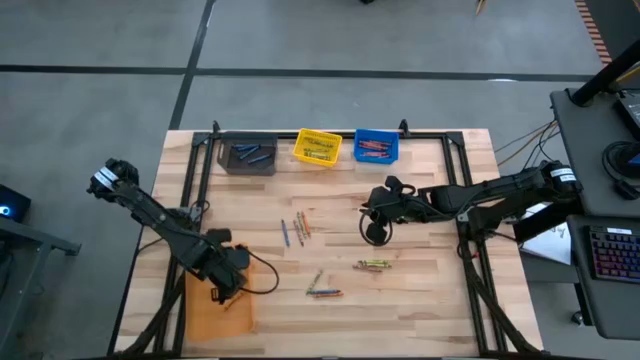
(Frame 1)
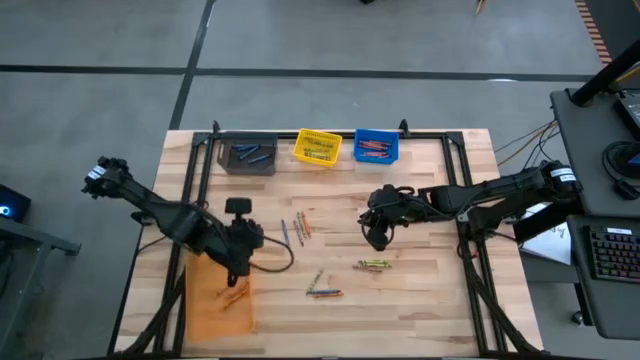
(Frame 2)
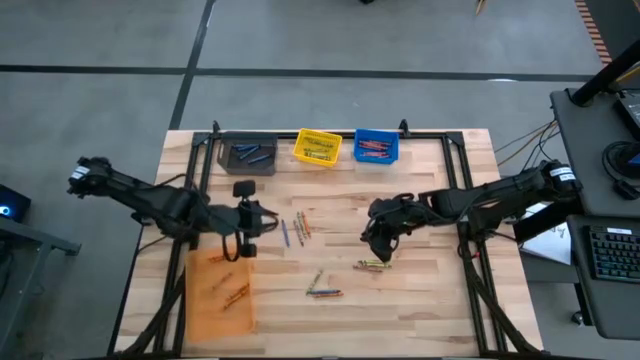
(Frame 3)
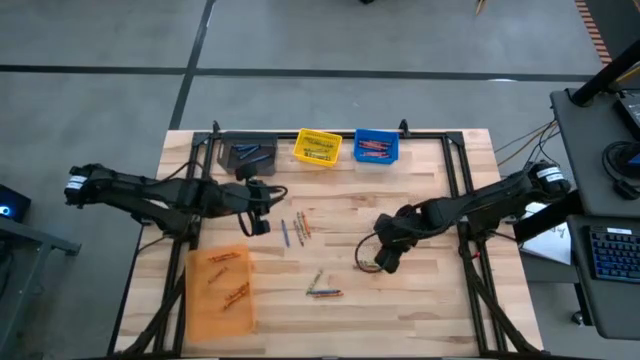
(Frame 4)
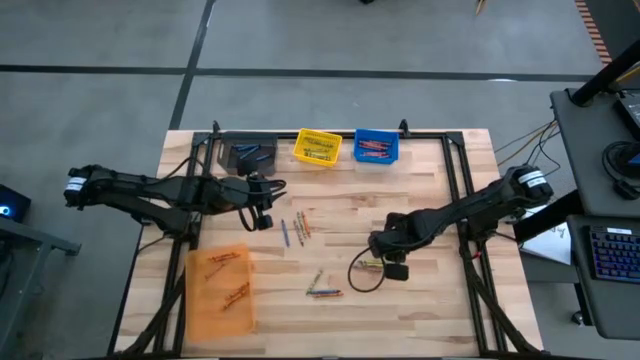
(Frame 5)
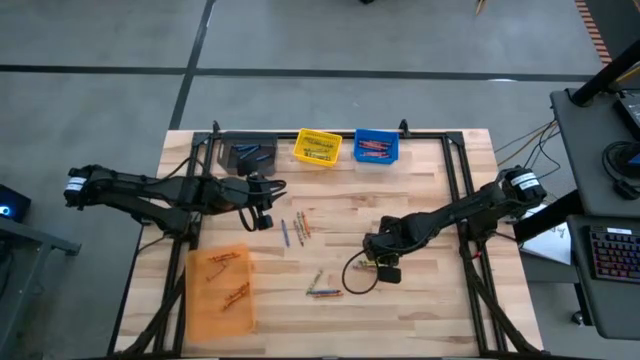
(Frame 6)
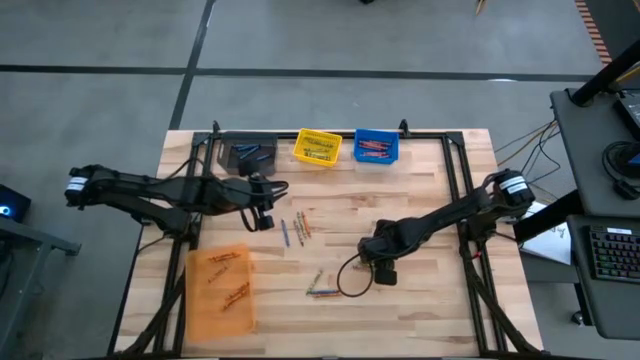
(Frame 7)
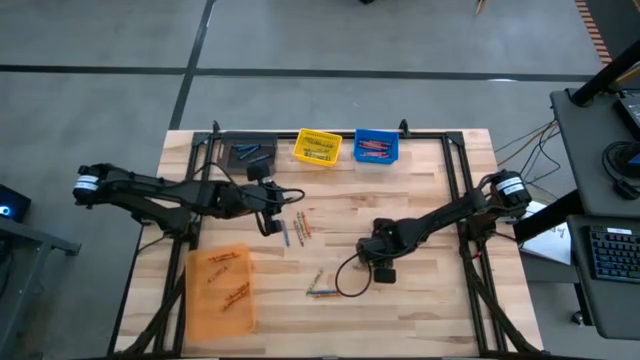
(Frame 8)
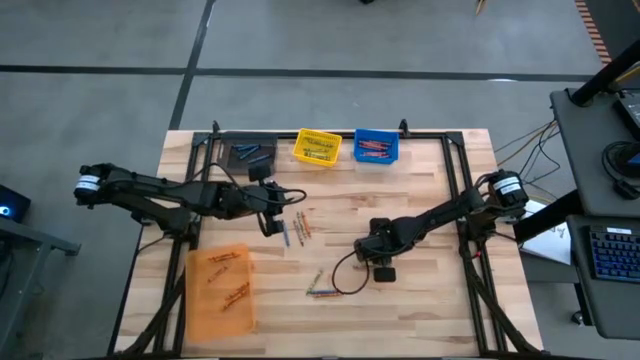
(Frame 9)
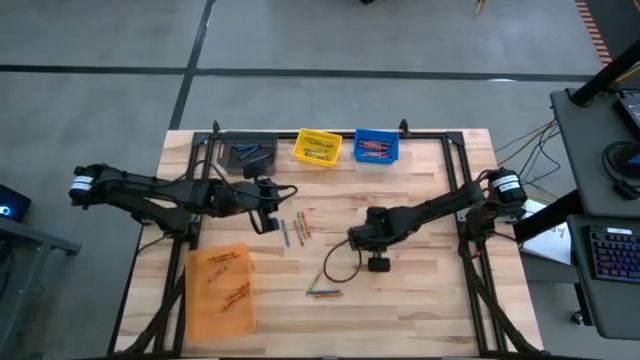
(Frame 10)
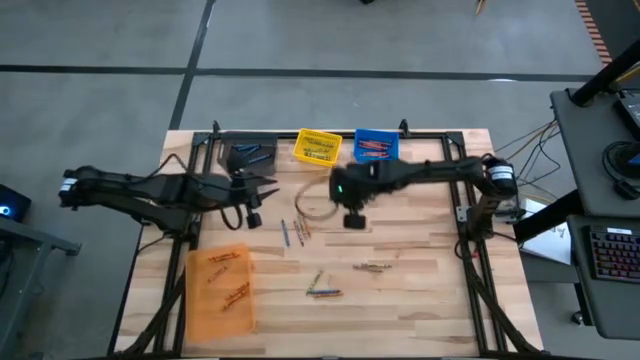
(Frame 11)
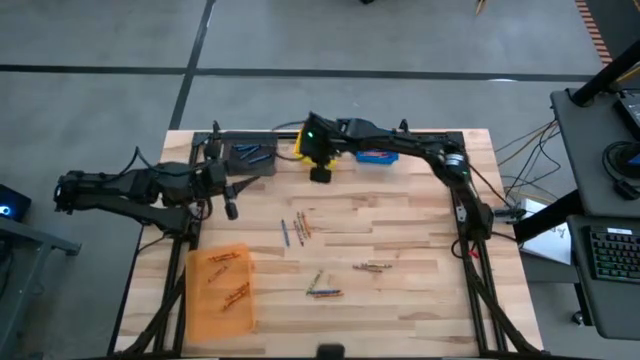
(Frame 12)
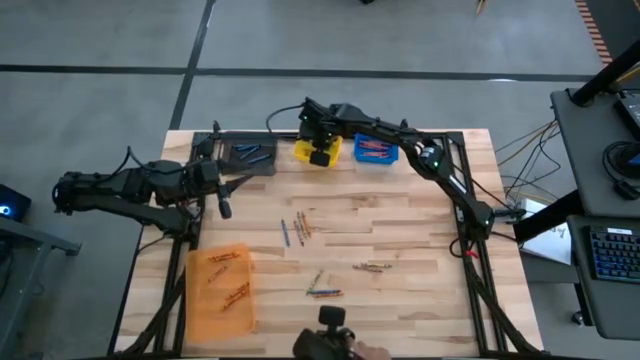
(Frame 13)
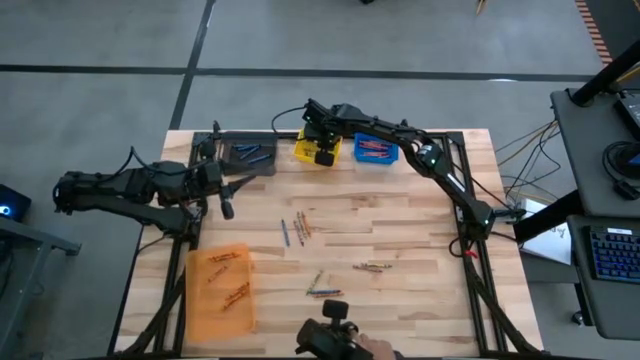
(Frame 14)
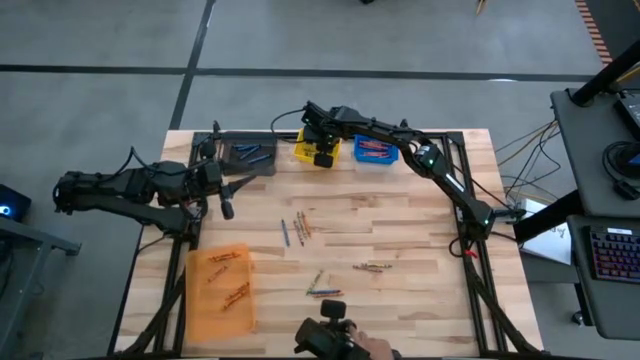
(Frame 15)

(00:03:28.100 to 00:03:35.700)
Task: Sort crayons
Put the green crayon into the yellow bin

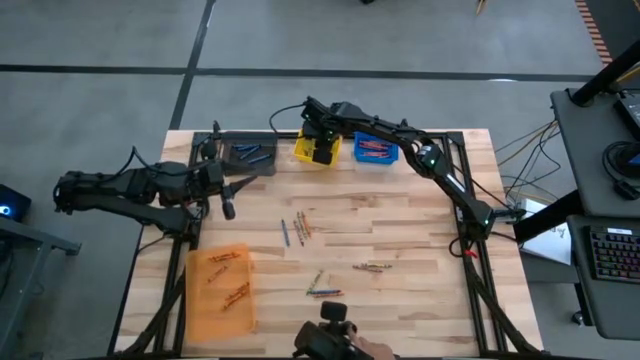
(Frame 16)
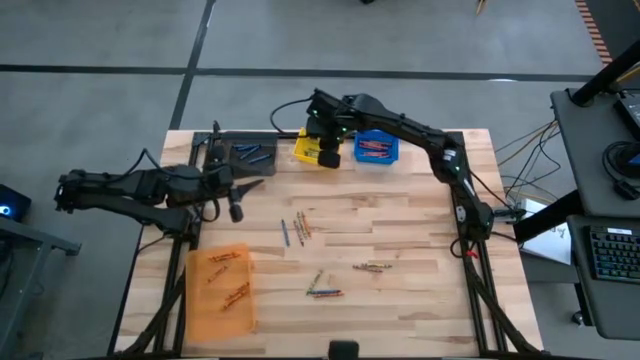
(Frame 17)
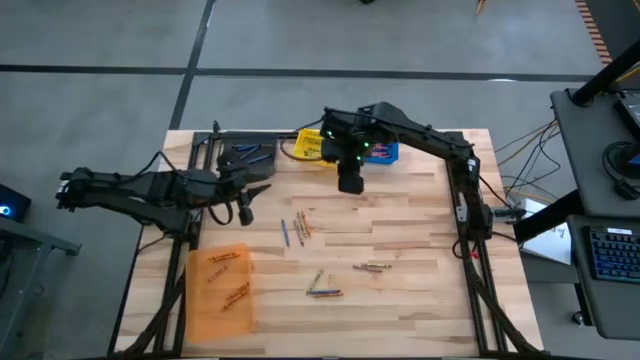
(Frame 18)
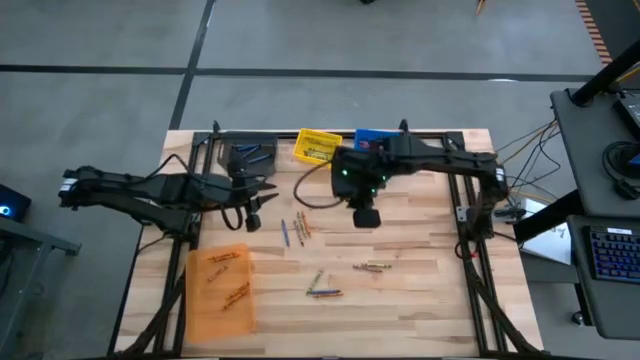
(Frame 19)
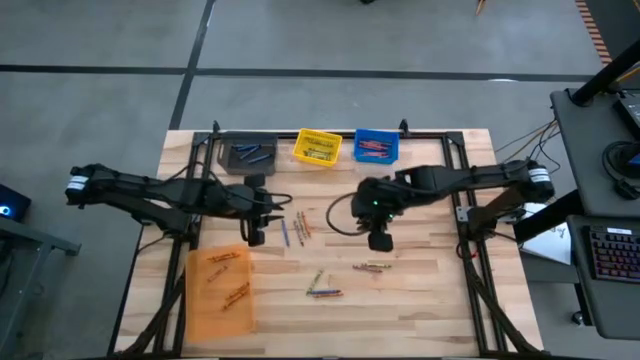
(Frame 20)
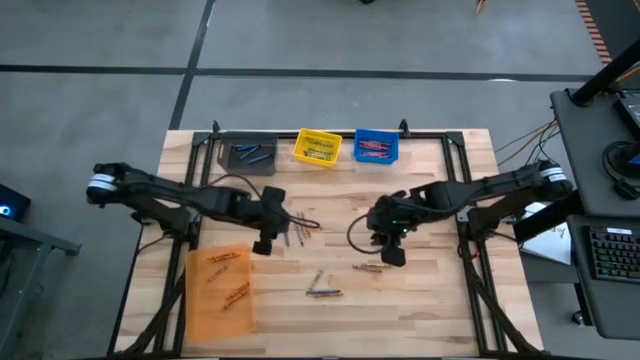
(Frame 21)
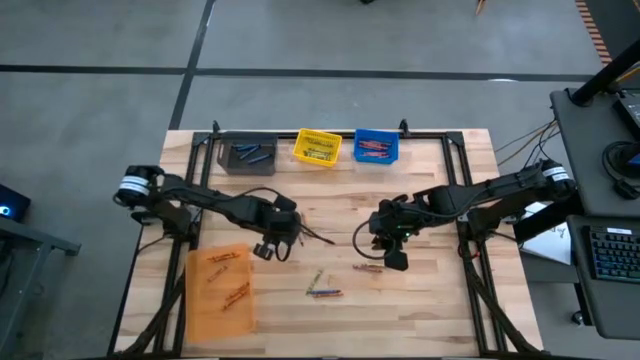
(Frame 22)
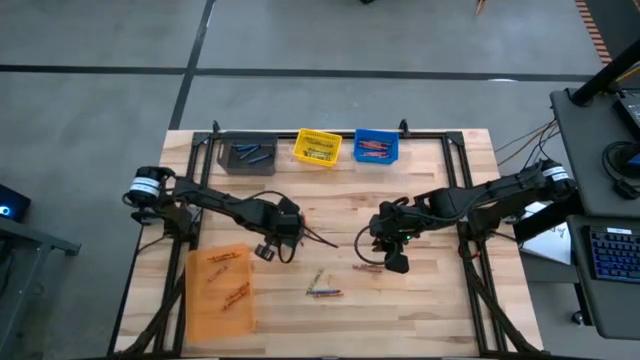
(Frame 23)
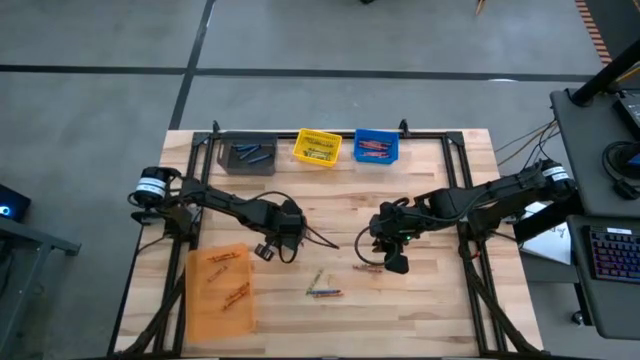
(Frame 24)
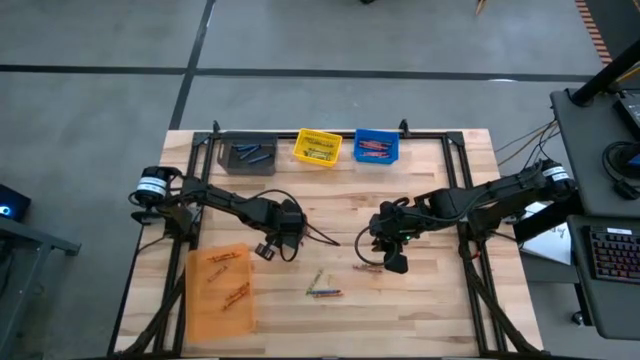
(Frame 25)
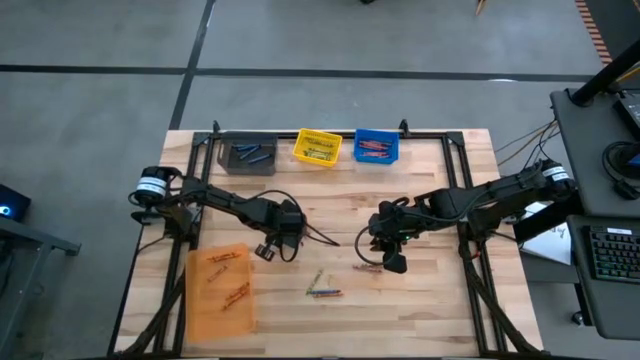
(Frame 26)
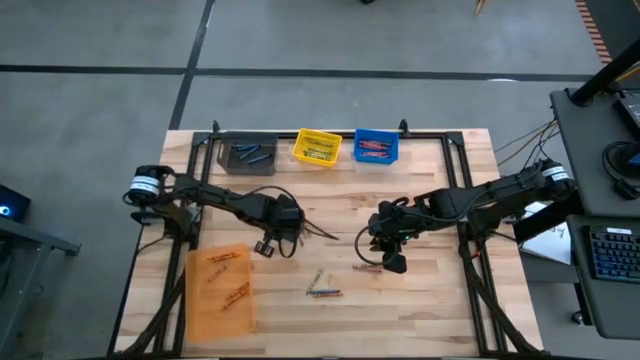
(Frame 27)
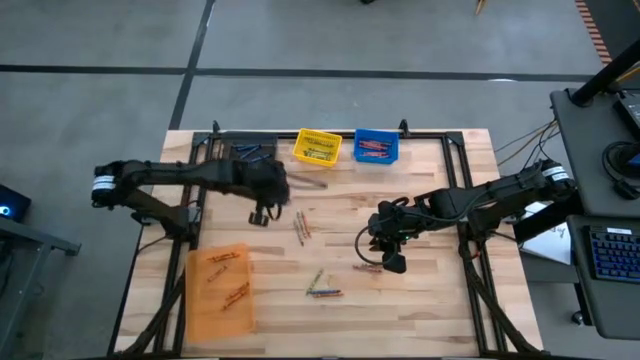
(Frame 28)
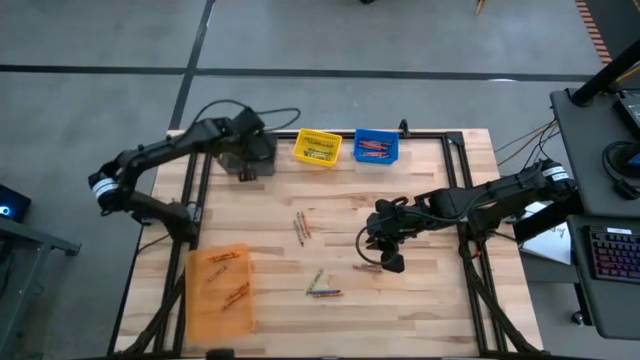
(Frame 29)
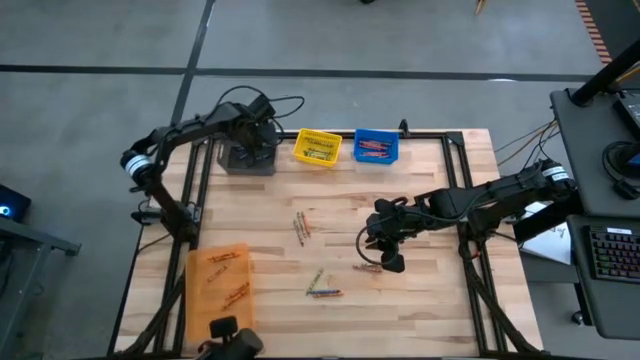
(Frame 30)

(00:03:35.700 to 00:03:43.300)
Put the blue crayon into the black bin

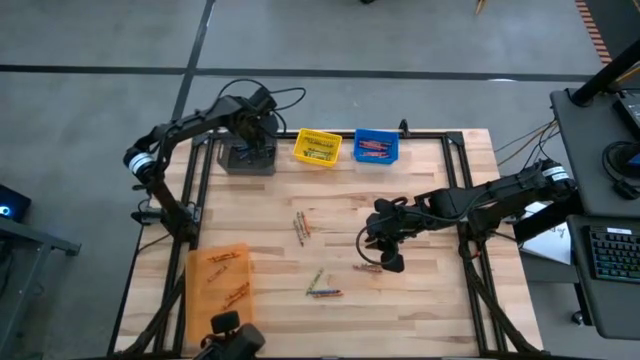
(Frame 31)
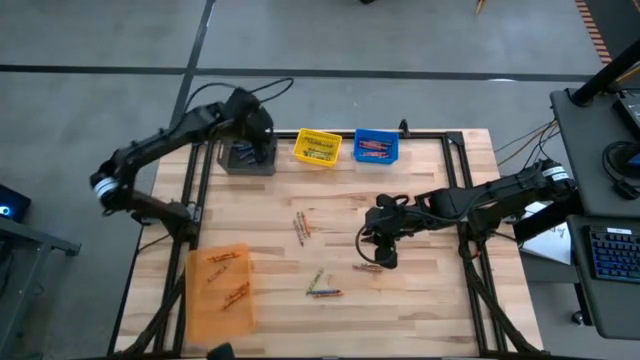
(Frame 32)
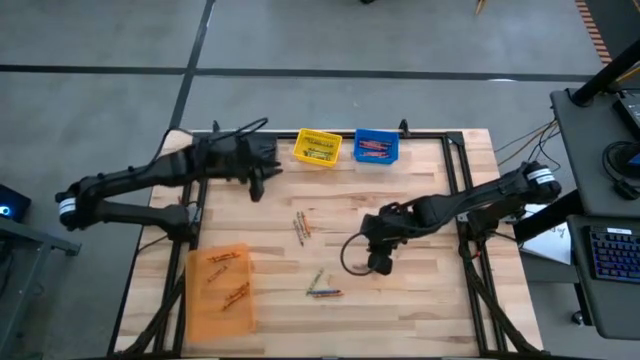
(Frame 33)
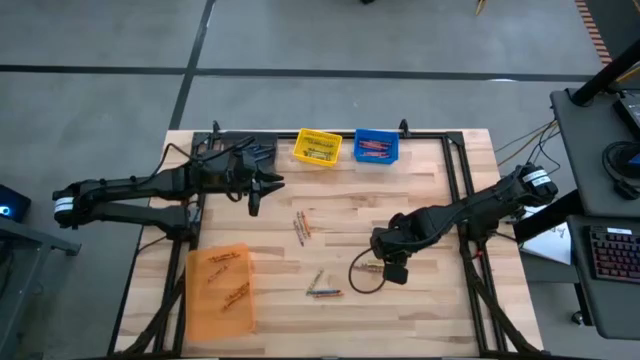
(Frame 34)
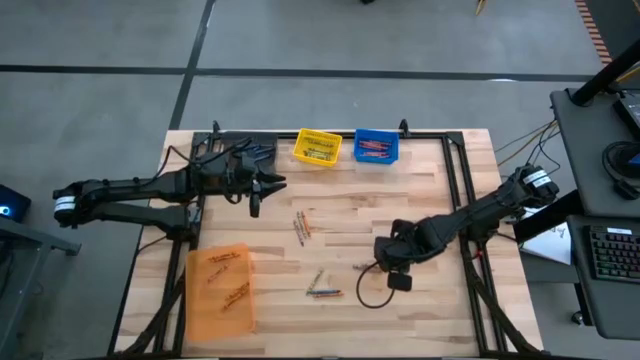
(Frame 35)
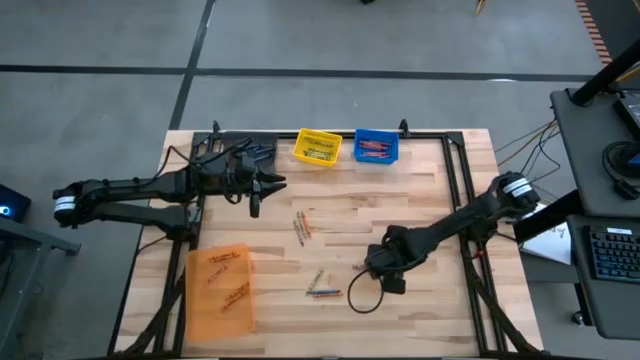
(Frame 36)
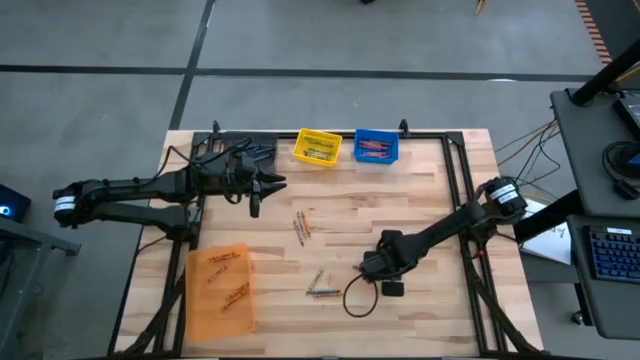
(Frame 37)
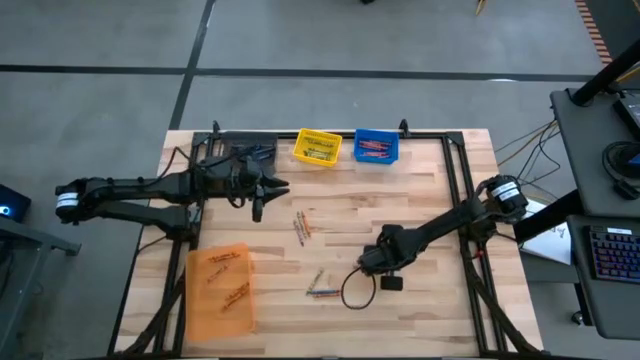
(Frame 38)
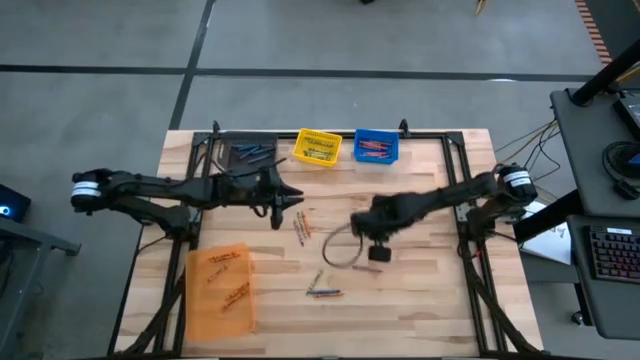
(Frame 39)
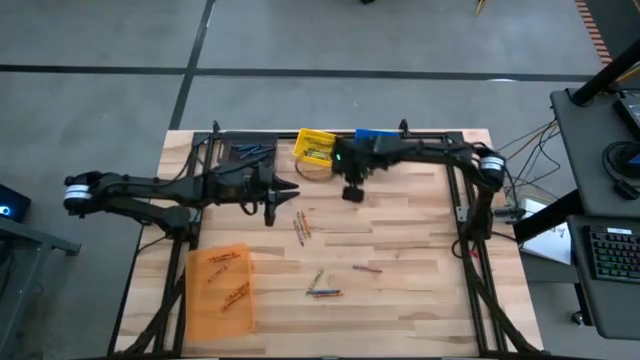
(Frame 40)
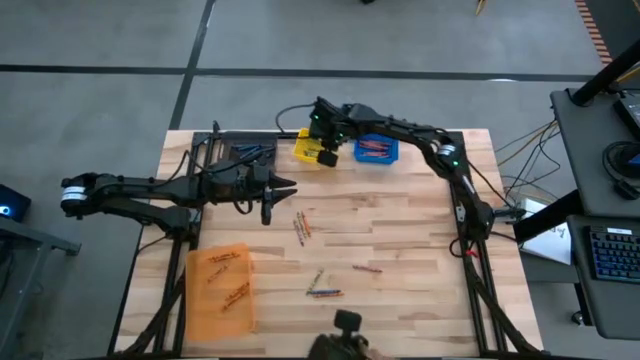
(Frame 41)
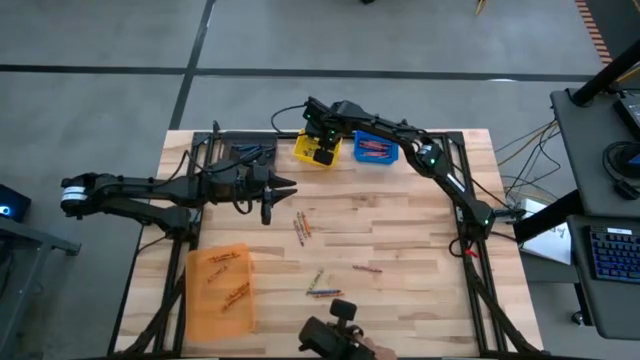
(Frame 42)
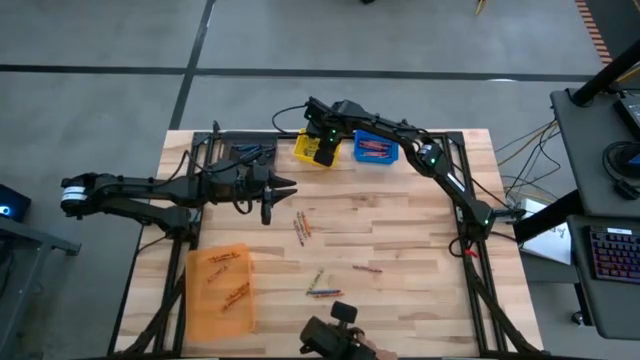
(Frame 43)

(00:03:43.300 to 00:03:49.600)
Put the green crayon into the yellow bin
